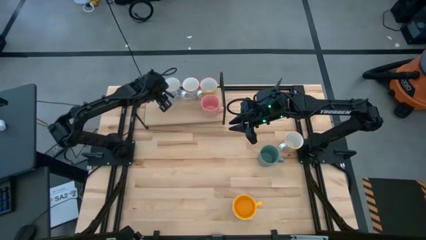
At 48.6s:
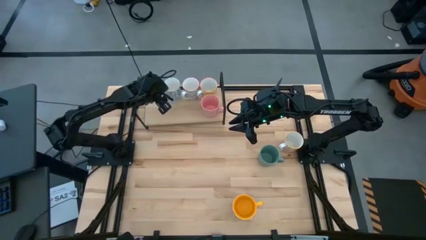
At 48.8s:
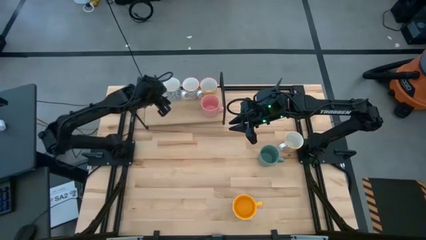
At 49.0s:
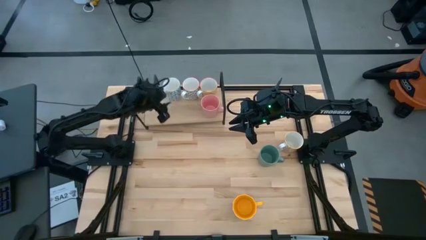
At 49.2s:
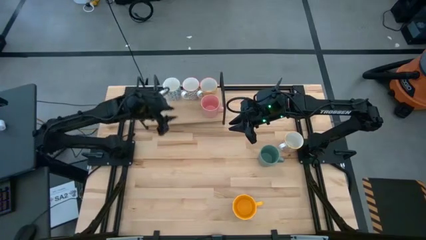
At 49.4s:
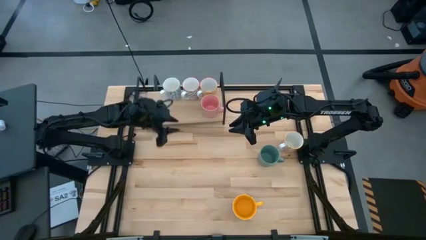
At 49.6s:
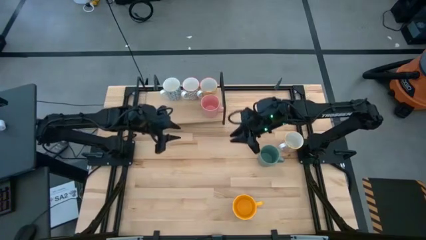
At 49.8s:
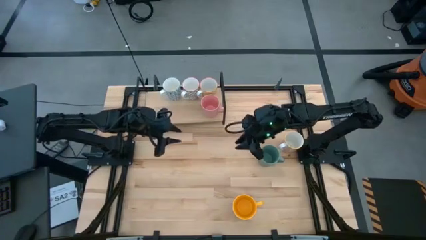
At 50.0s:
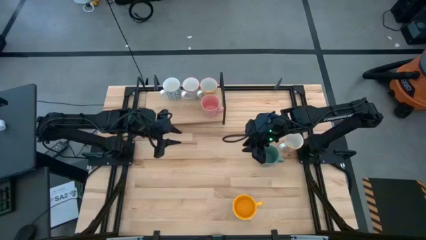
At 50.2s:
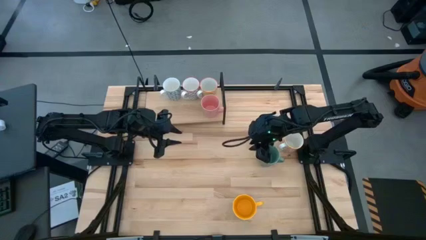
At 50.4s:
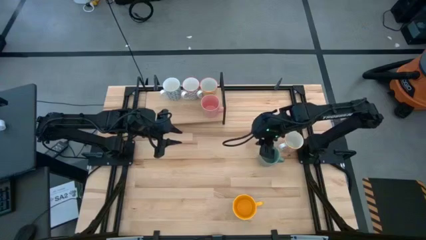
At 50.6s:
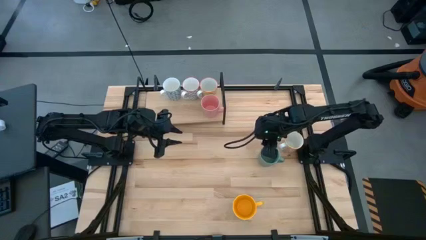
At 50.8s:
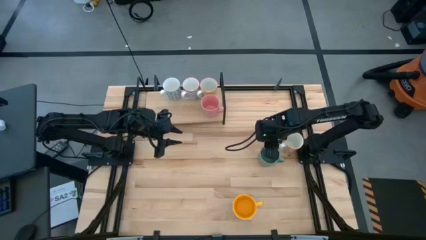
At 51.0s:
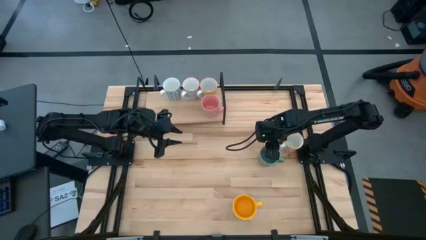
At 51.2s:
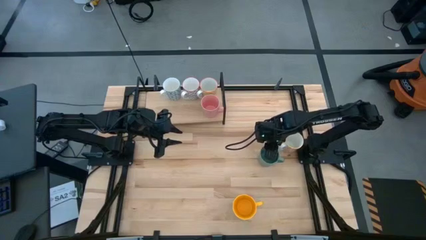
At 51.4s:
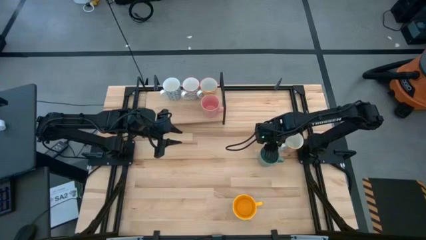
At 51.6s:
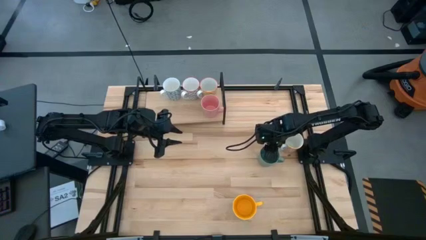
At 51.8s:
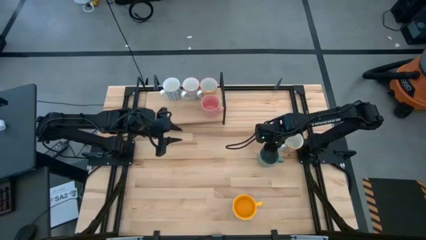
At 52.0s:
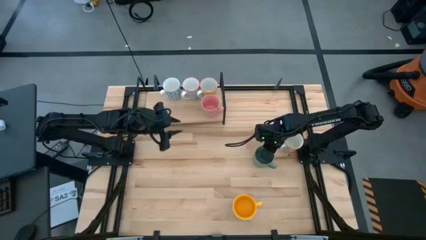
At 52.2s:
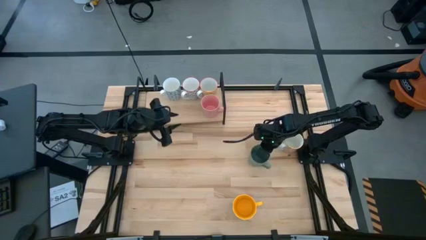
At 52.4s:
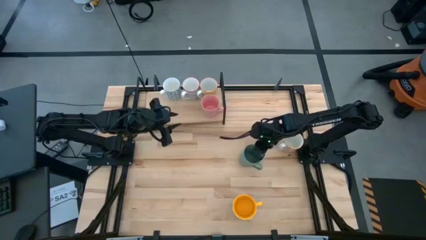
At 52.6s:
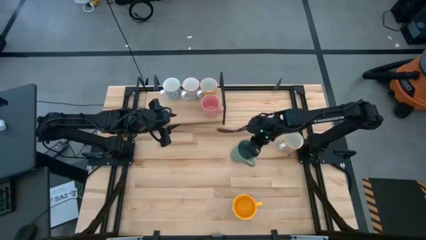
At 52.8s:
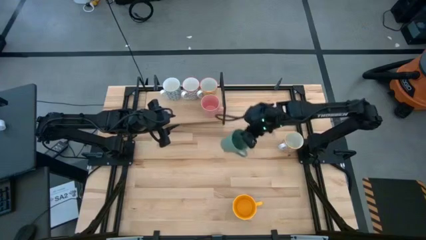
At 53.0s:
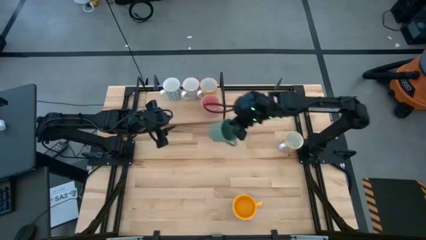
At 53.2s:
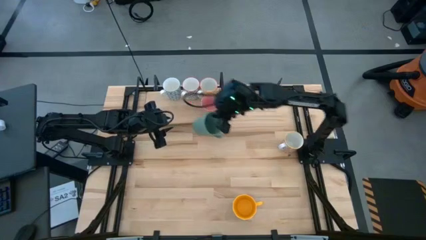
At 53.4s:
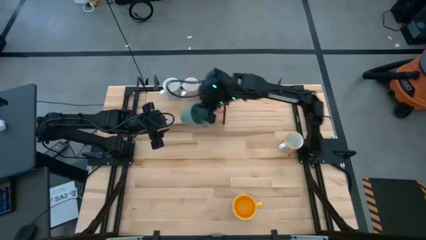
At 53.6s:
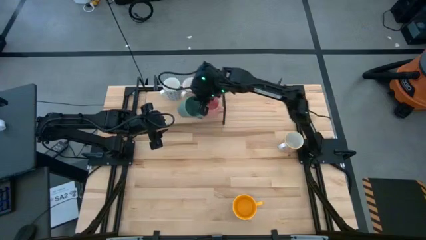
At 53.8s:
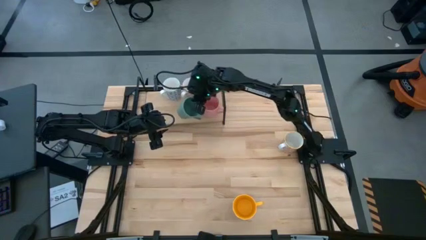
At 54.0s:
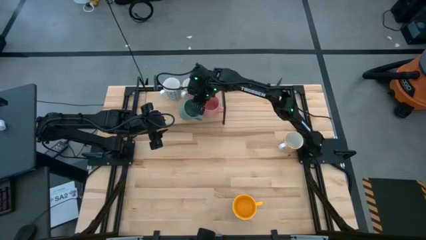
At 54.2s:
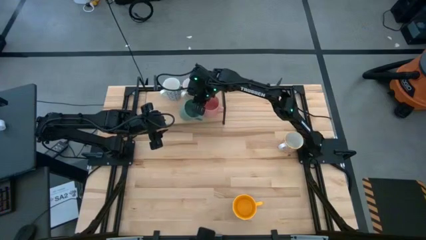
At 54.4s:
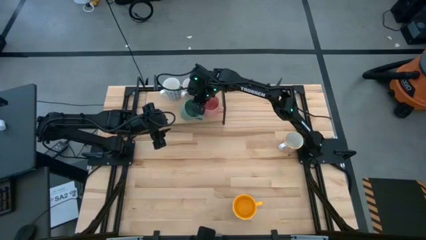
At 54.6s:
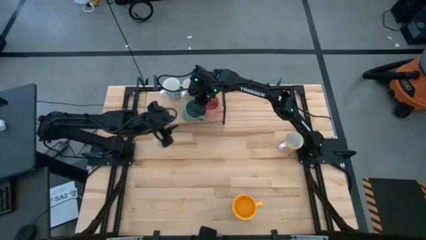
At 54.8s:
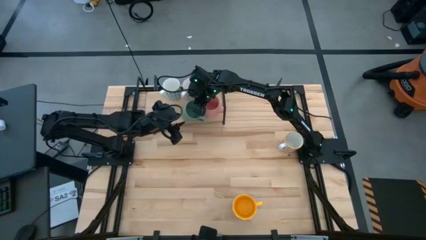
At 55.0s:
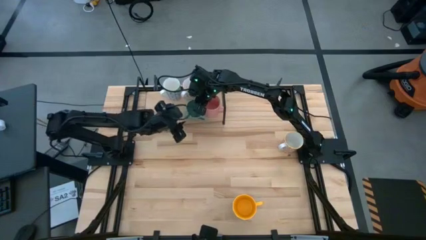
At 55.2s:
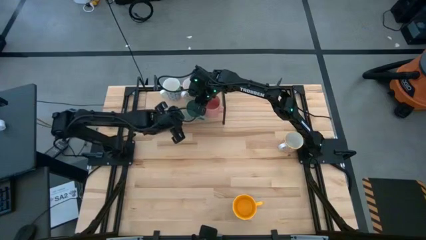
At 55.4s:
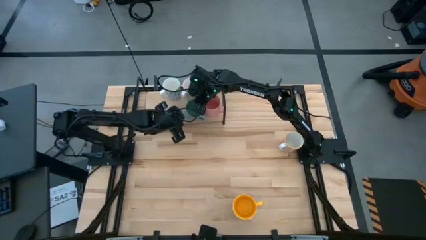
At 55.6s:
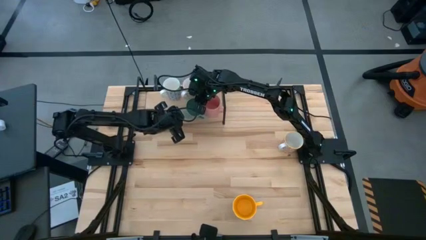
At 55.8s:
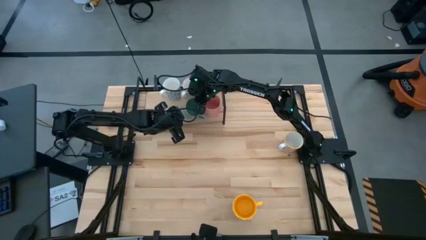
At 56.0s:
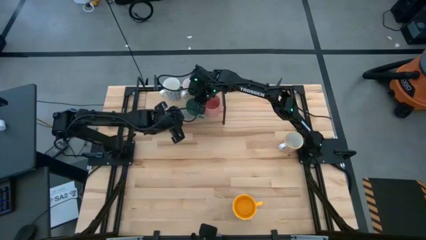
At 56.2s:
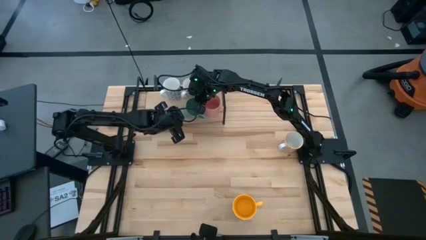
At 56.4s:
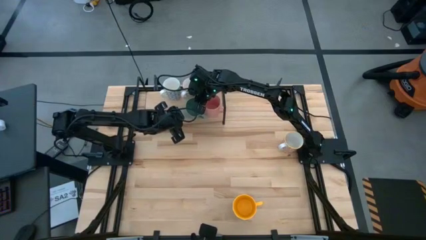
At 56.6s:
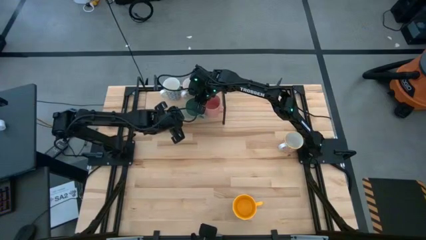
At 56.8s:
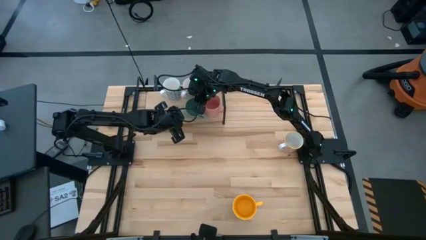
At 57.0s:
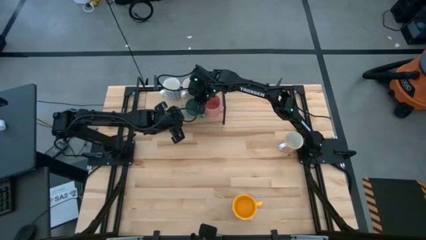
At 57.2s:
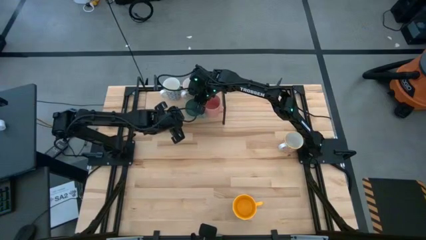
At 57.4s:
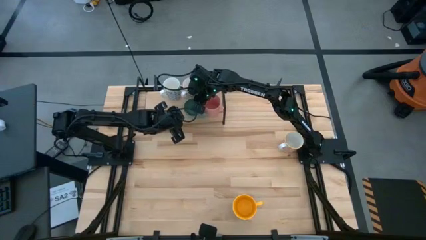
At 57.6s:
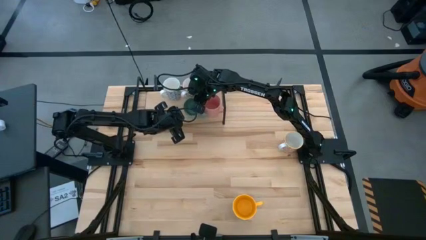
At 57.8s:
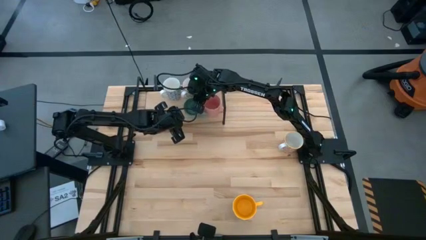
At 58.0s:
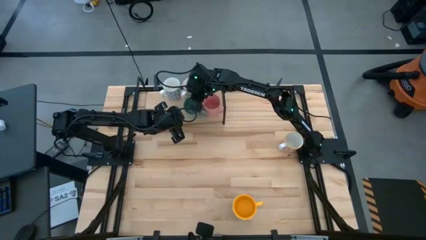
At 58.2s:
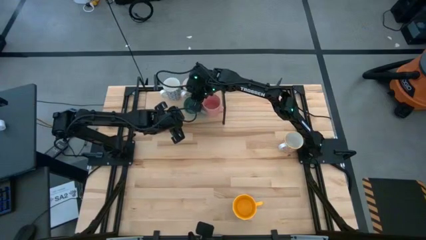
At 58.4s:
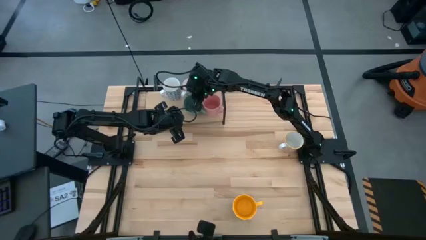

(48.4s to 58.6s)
Task: Place coffee mugs
Put the green mug on the shelf
